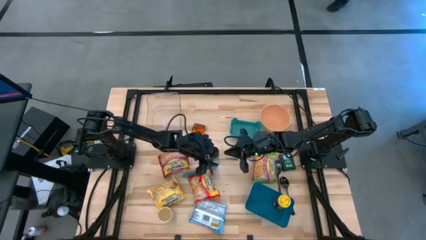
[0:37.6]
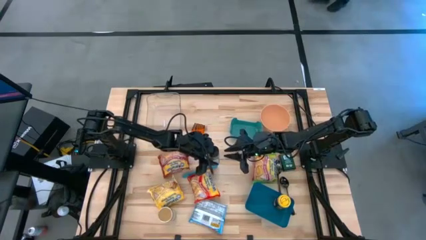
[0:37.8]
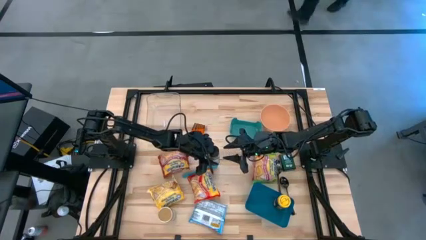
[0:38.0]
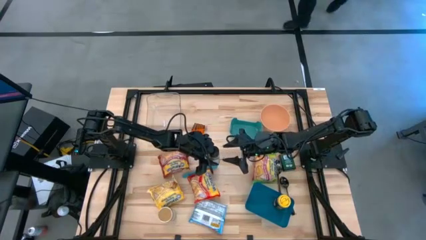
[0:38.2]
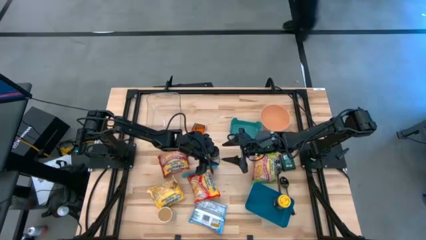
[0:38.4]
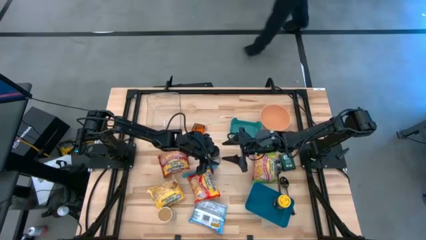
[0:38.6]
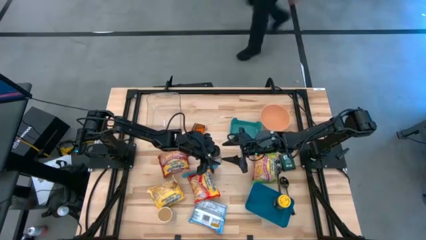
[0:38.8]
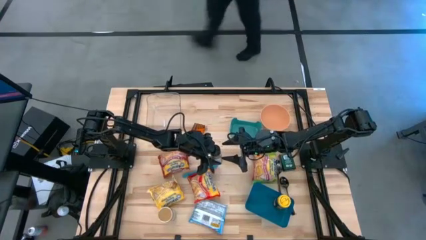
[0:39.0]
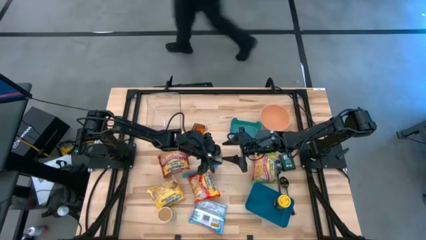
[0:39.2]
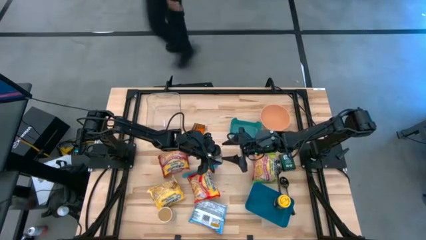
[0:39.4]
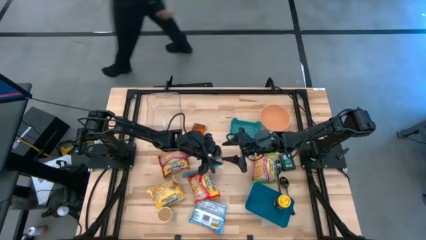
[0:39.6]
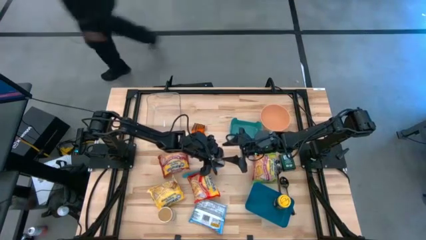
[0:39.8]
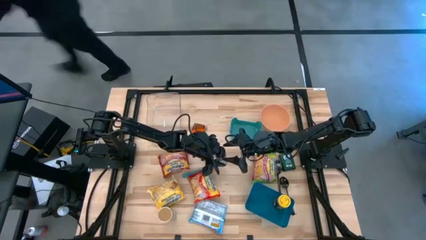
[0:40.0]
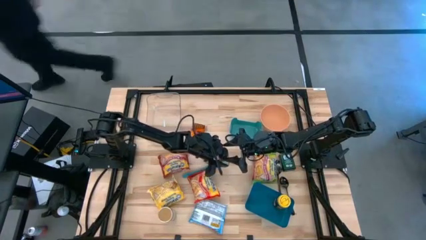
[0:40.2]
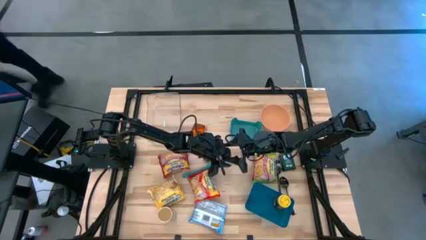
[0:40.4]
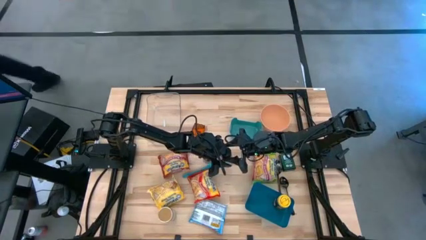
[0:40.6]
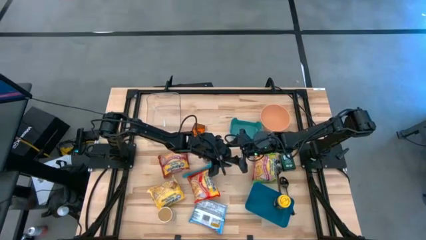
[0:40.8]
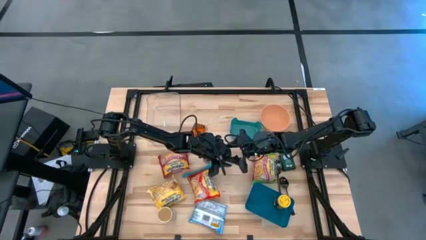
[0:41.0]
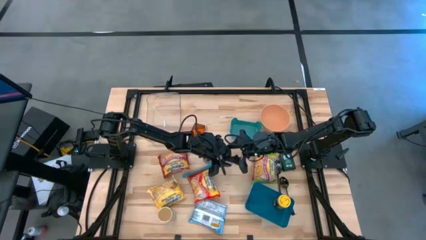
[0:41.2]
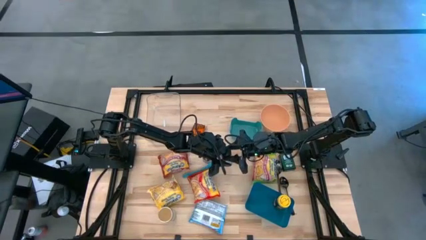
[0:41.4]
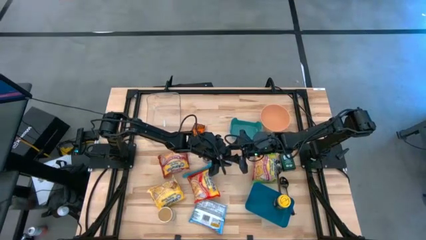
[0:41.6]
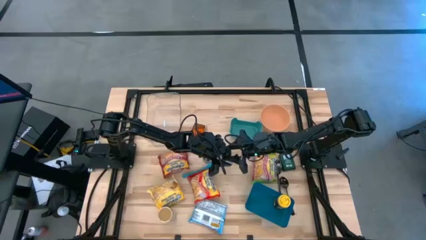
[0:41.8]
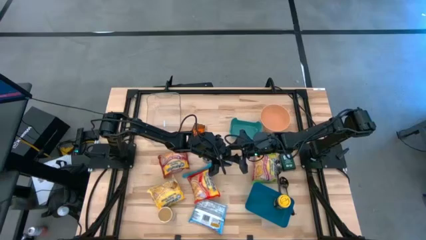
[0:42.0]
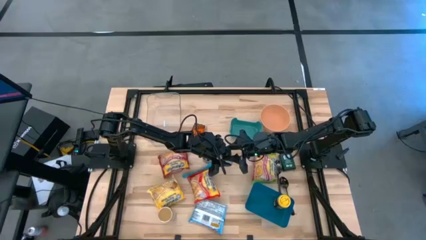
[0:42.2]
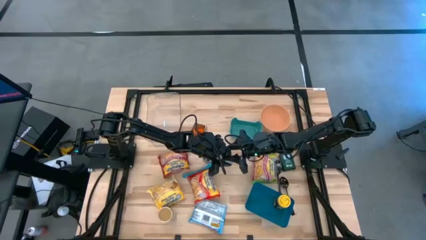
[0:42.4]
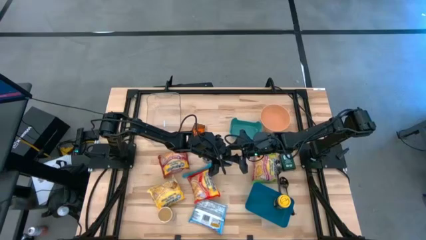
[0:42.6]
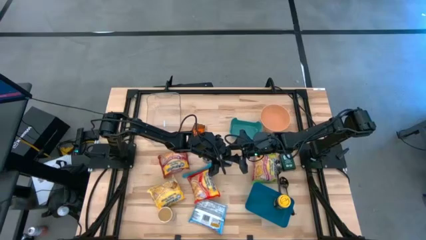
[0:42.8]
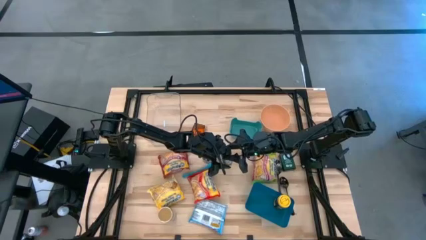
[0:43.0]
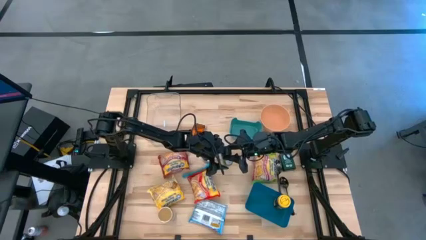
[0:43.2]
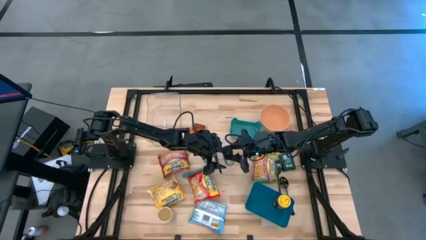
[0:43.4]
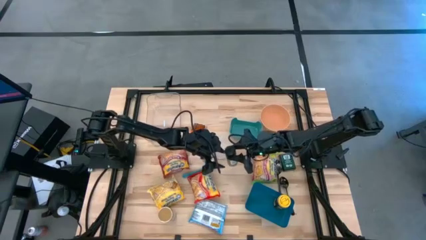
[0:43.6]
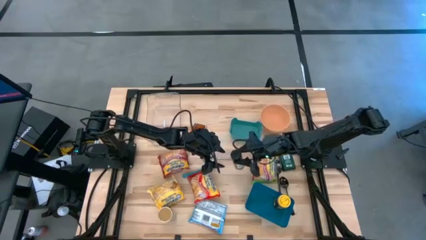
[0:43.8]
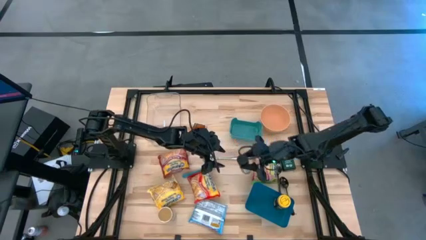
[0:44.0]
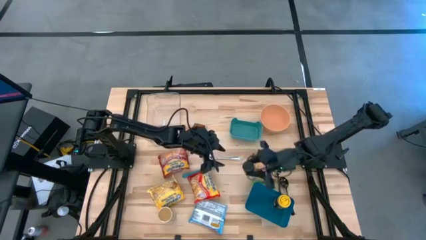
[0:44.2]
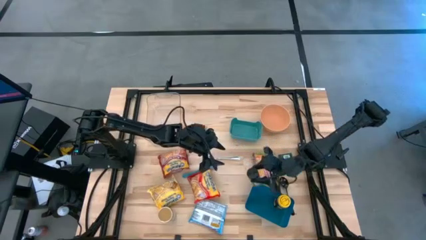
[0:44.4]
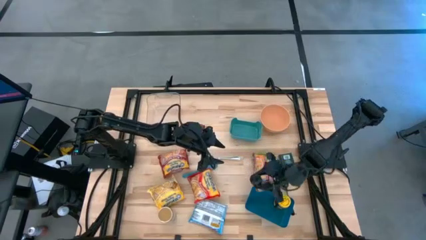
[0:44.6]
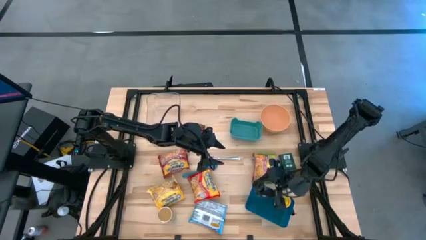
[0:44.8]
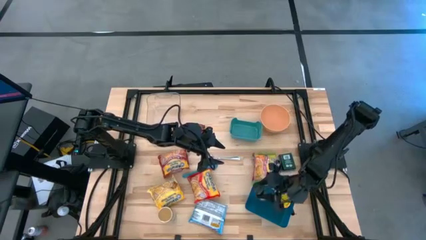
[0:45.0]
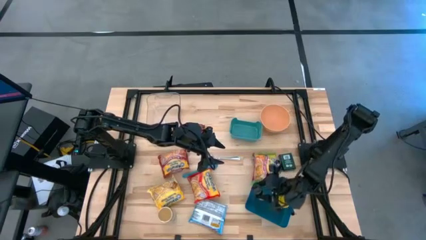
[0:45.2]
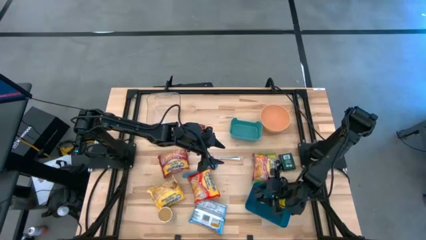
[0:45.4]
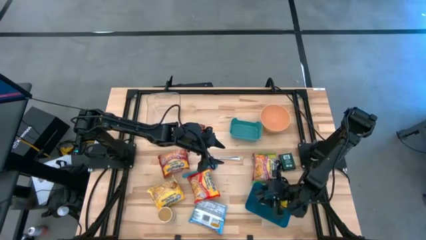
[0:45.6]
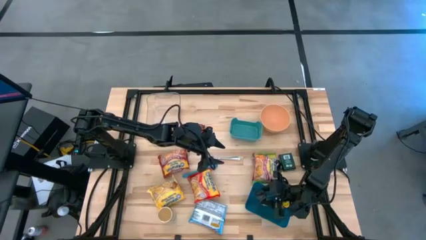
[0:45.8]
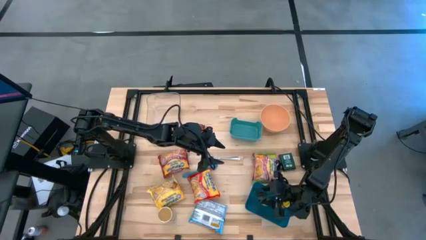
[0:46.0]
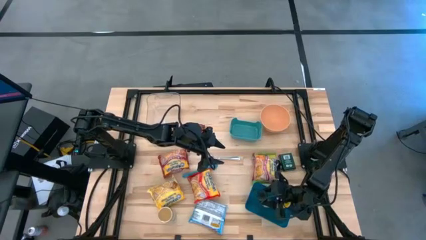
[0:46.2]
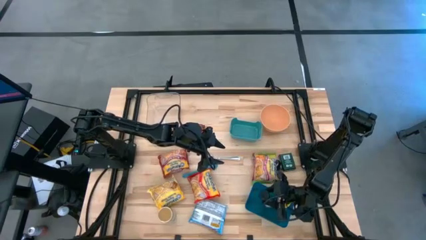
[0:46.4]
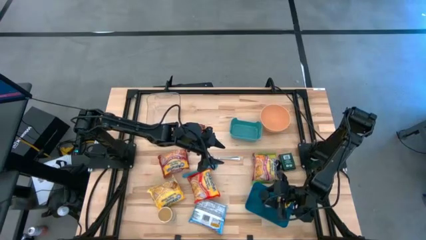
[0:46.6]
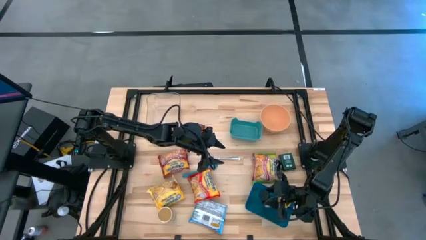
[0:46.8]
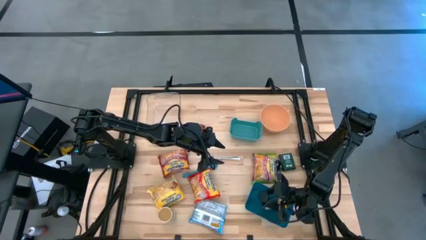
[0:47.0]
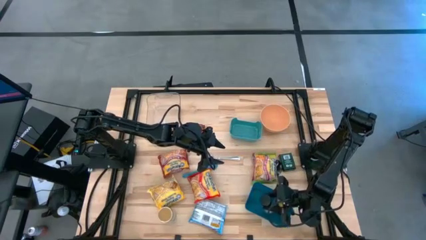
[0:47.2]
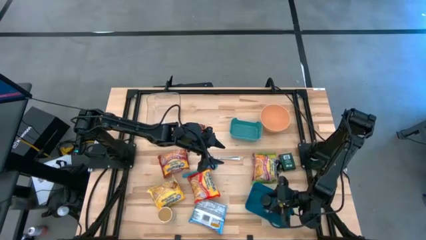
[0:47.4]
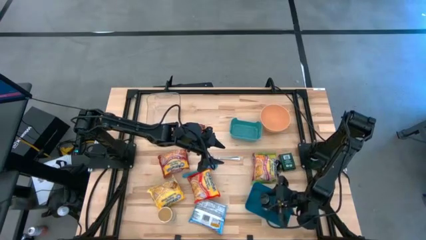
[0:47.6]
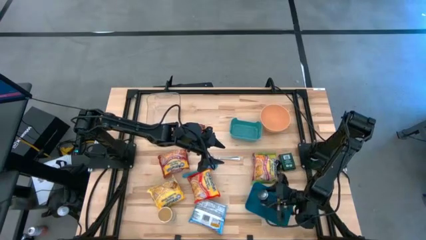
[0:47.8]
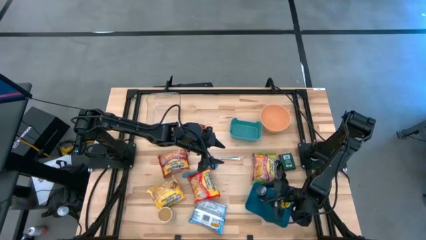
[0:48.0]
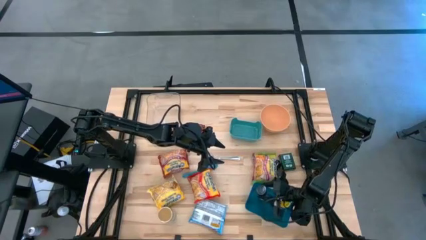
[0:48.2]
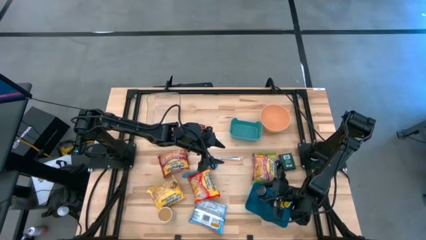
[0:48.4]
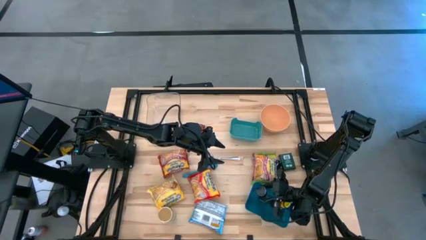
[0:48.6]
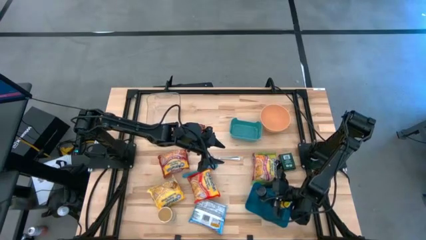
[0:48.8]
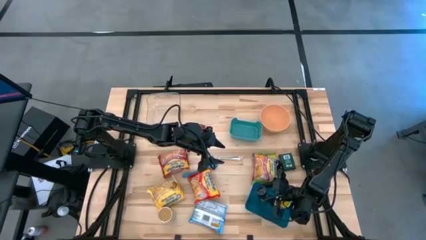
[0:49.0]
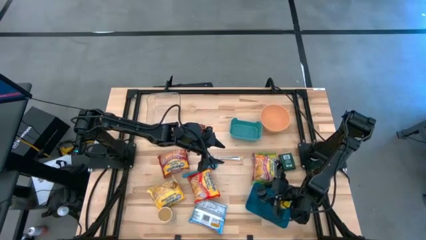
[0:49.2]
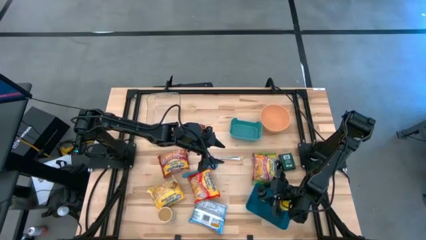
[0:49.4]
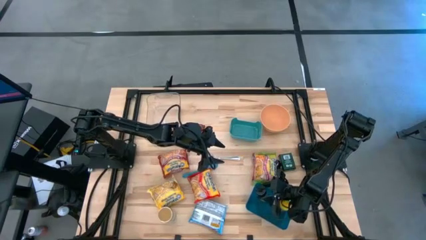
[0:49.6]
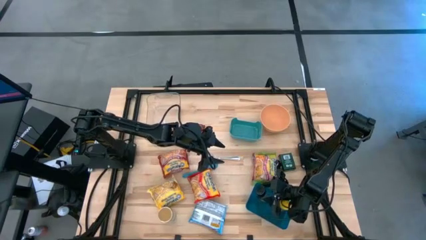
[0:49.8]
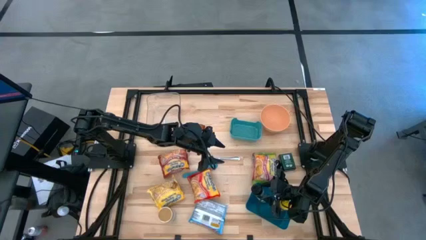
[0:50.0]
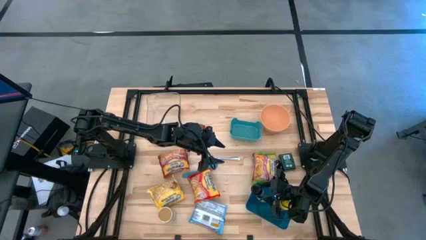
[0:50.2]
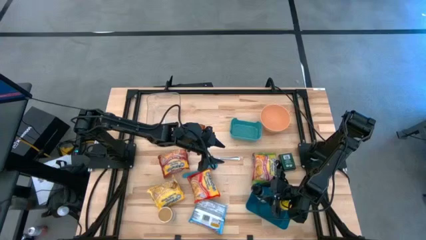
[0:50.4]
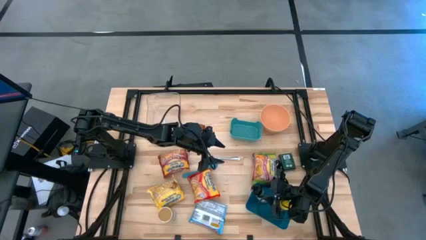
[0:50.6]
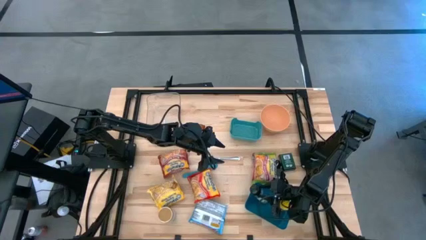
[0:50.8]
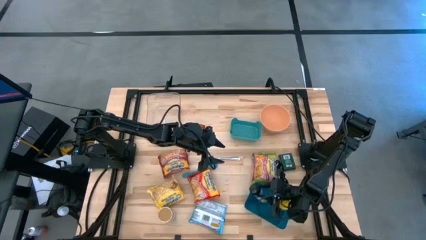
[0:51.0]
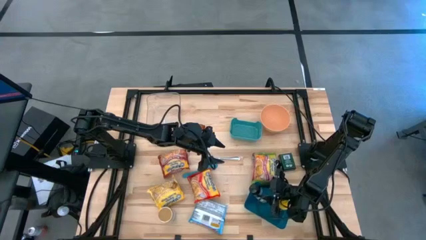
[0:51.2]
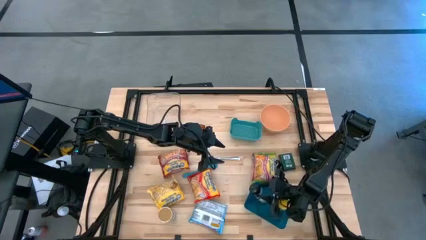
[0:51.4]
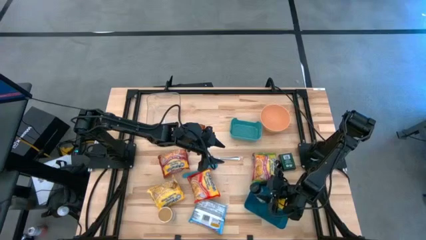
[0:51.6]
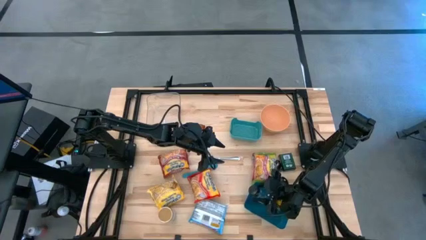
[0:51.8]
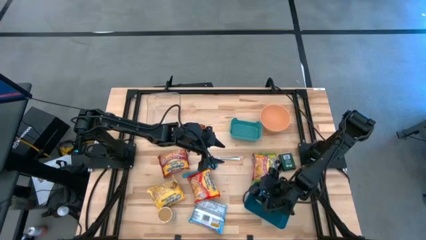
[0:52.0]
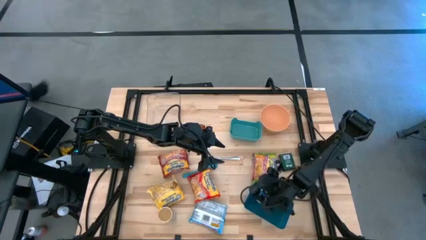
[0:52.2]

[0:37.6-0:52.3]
Task: Pick & Place Food Item
Put the black seasoning bottle into the blue bin

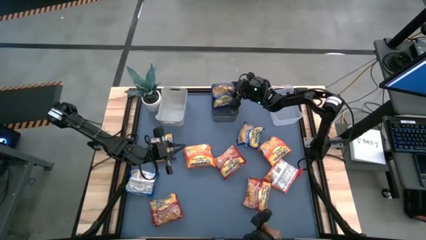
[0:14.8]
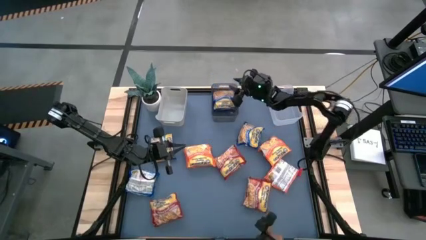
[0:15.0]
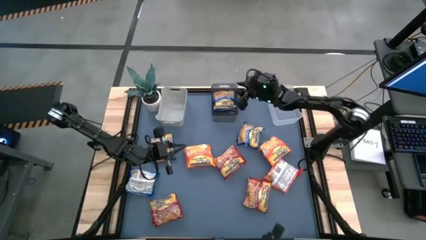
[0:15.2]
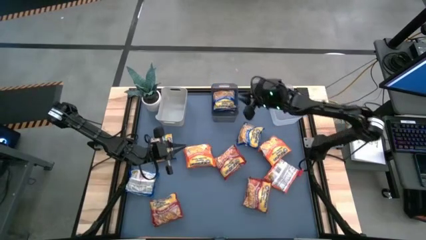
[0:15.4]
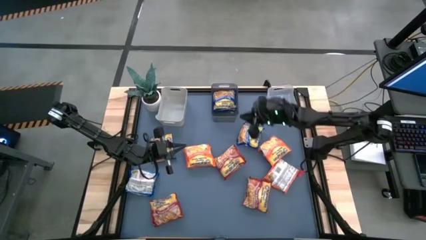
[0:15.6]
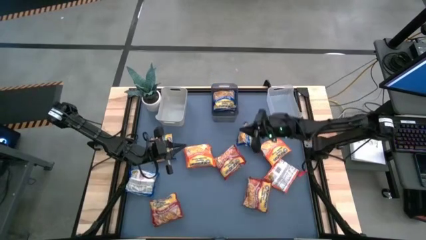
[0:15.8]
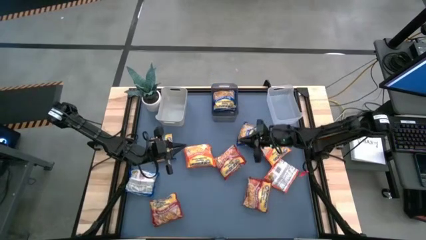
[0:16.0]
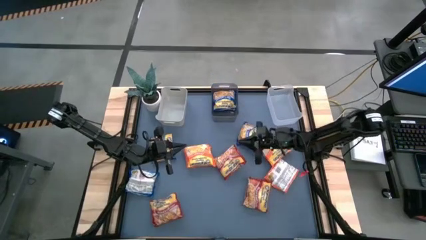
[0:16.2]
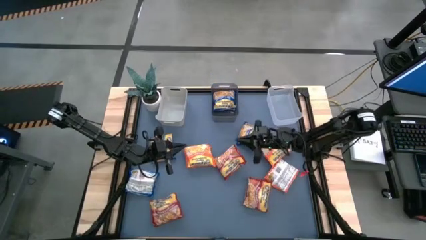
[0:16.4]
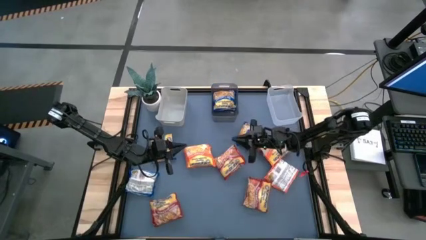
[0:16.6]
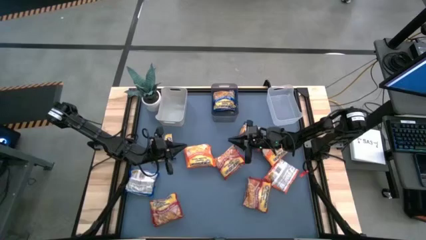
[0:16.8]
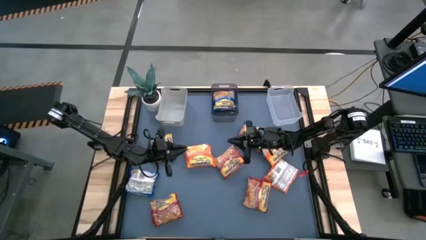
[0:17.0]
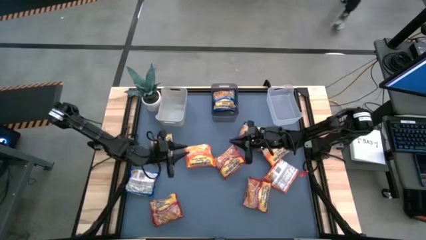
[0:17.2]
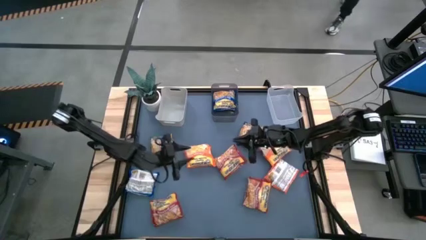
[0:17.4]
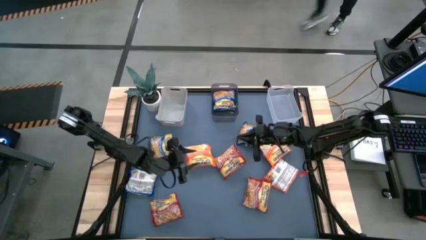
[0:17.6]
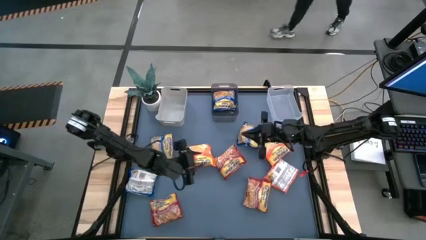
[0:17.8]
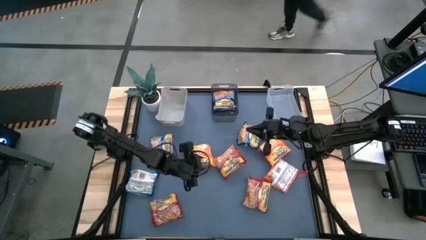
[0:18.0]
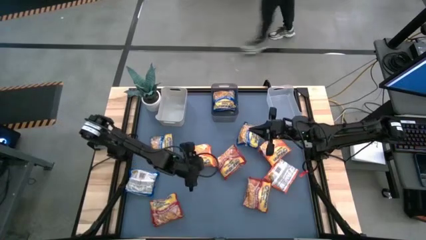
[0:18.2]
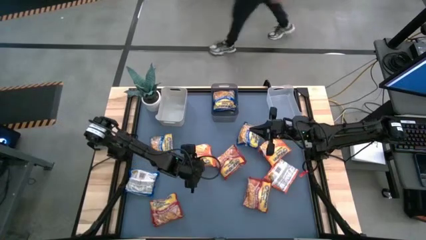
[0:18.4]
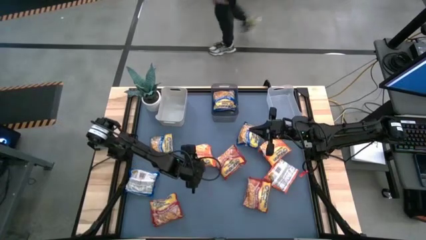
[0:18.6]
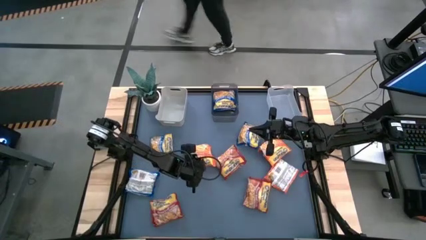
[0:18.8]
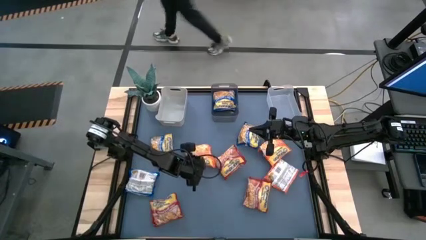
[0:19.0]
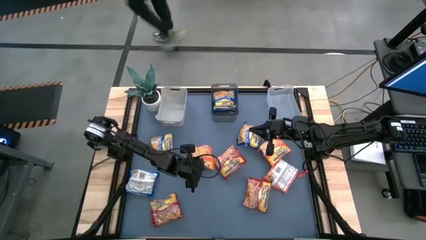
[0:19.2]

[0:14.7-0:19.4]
Task: Sort Maruchan noodles
Put the orange noodle pack into the gray bin
